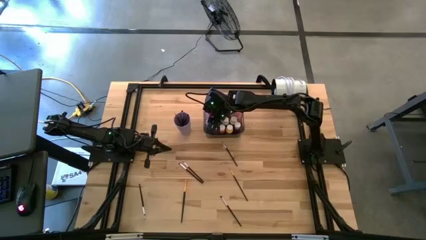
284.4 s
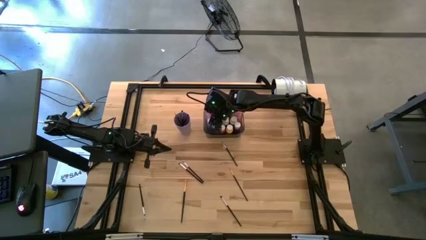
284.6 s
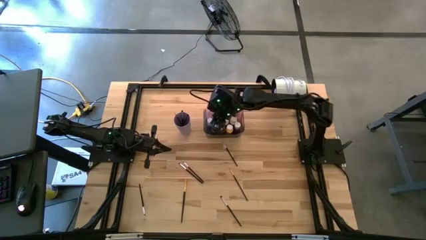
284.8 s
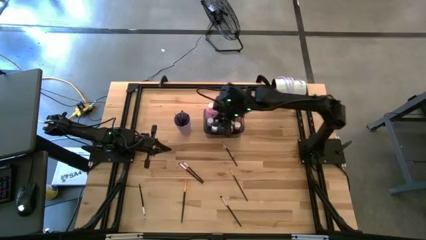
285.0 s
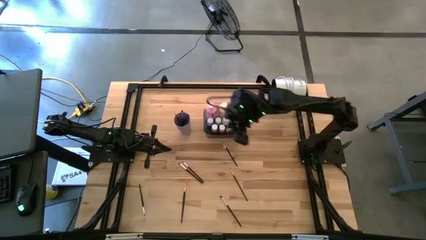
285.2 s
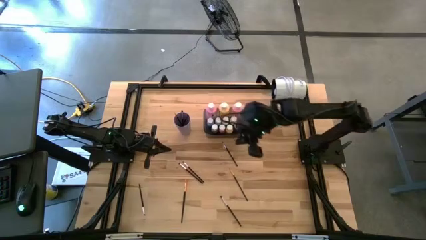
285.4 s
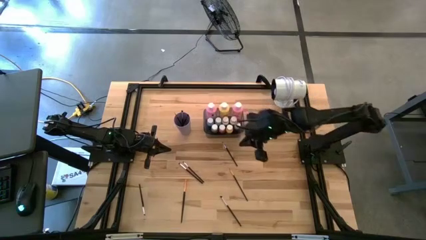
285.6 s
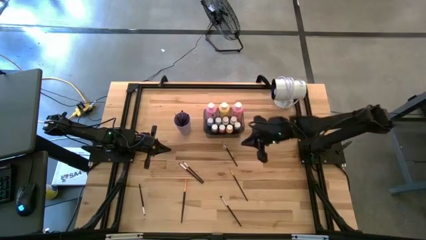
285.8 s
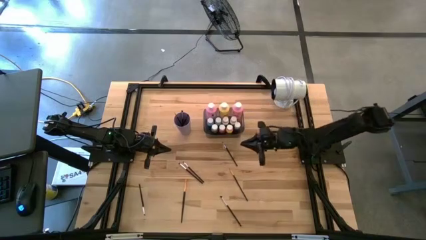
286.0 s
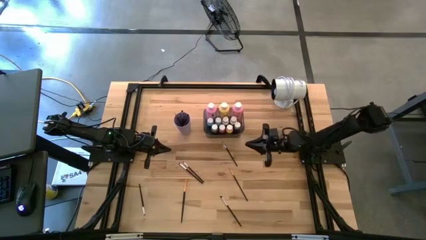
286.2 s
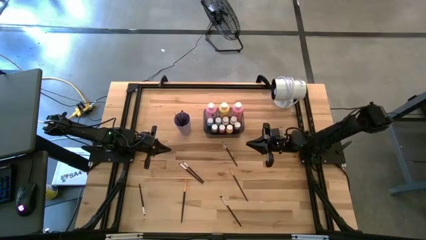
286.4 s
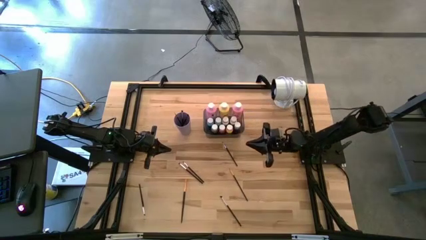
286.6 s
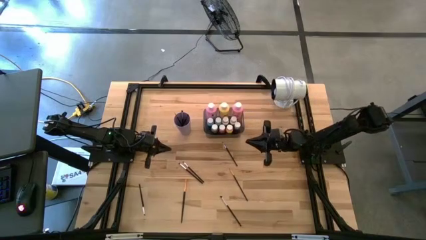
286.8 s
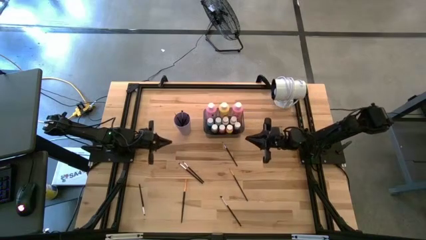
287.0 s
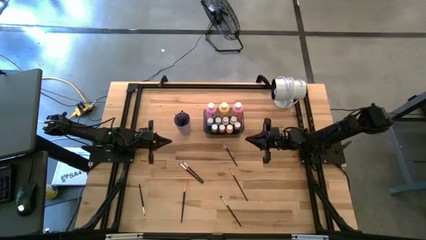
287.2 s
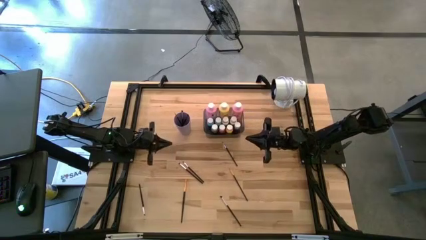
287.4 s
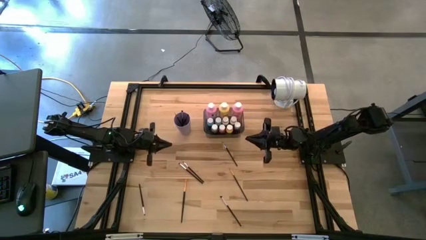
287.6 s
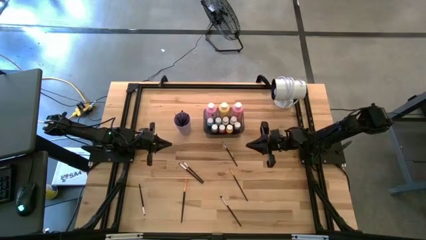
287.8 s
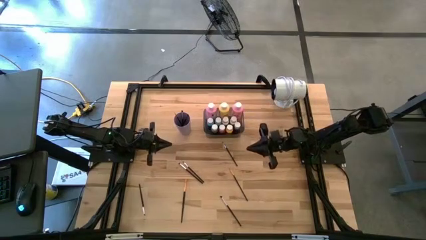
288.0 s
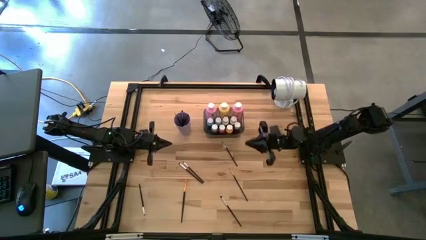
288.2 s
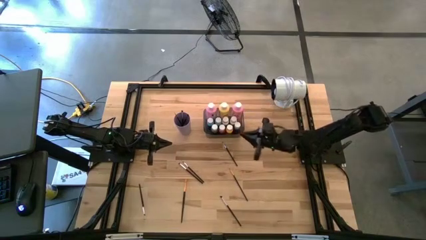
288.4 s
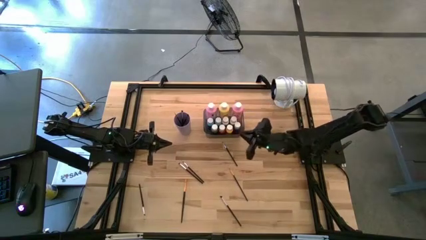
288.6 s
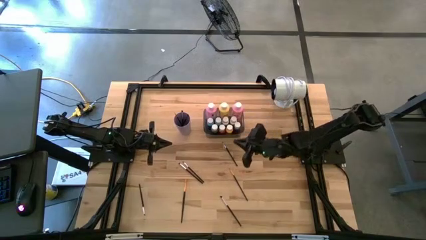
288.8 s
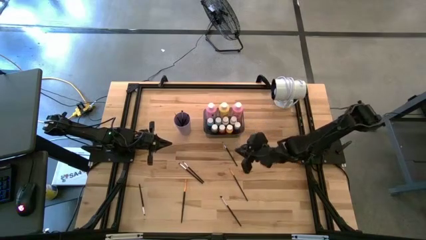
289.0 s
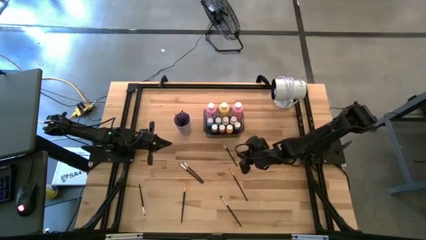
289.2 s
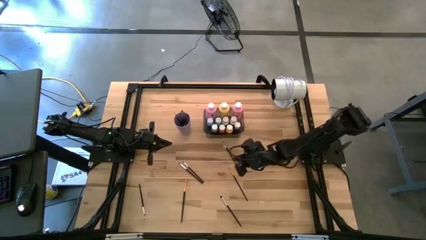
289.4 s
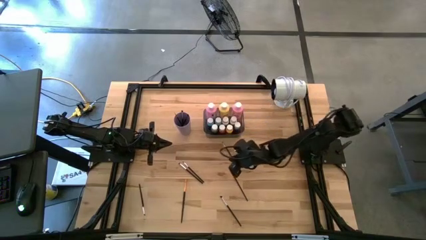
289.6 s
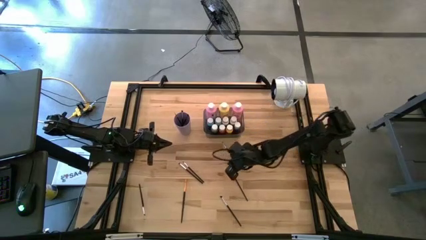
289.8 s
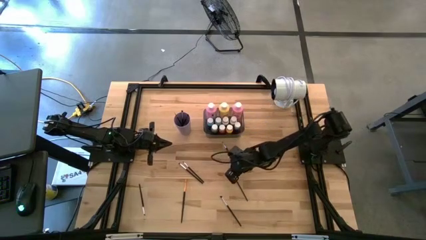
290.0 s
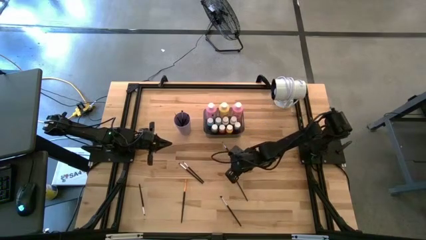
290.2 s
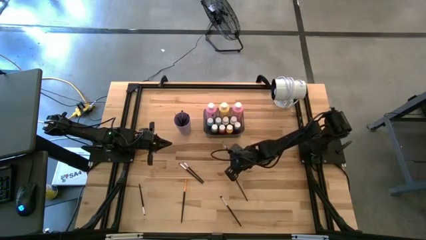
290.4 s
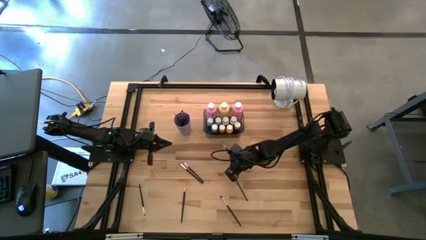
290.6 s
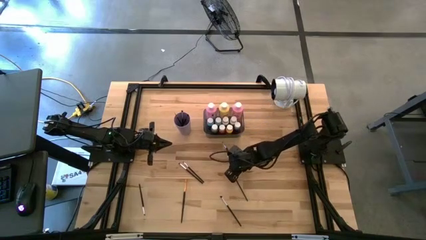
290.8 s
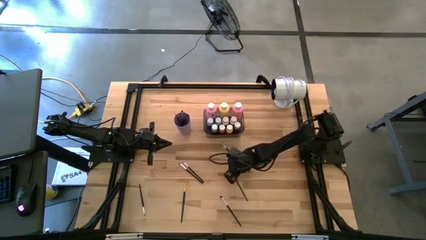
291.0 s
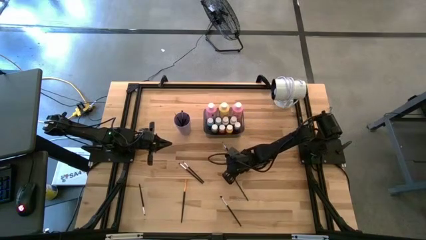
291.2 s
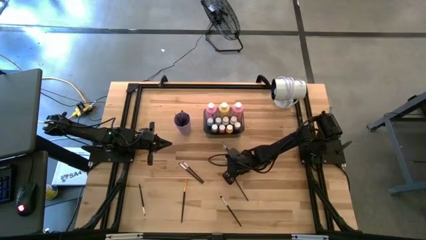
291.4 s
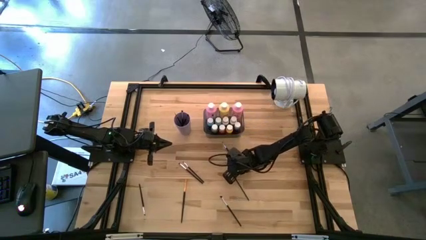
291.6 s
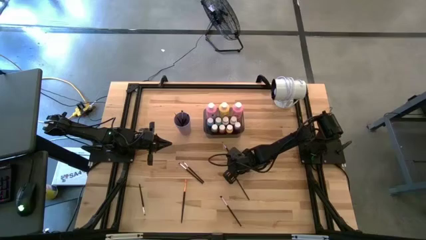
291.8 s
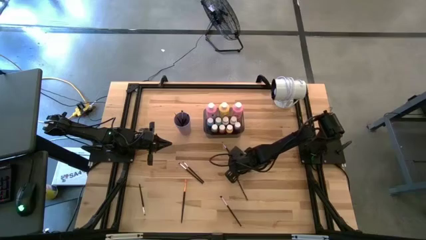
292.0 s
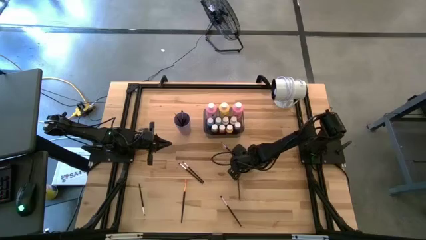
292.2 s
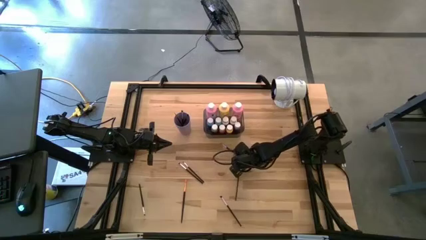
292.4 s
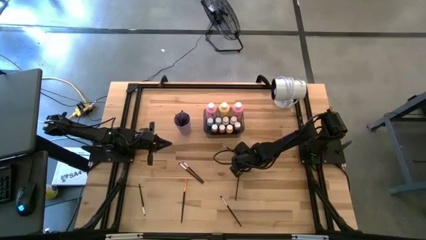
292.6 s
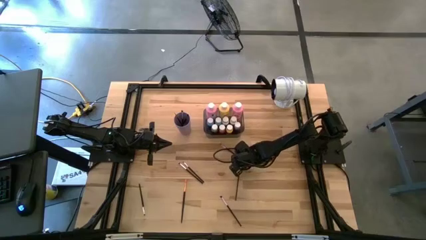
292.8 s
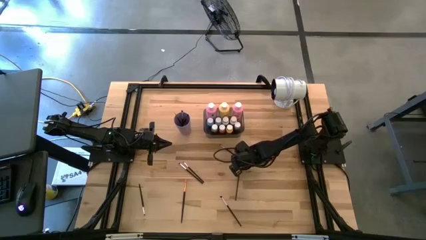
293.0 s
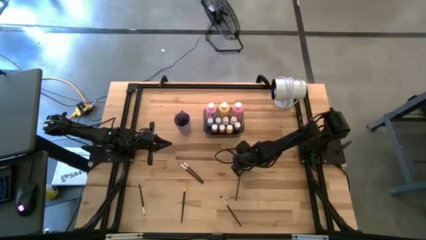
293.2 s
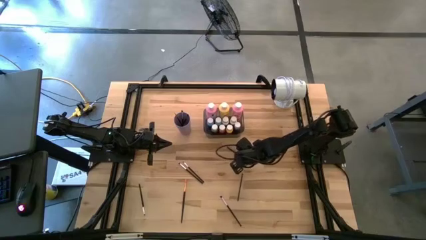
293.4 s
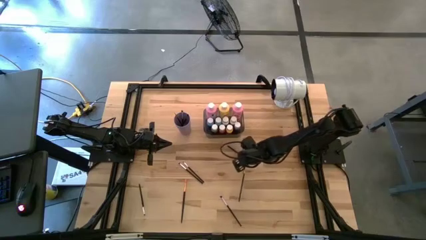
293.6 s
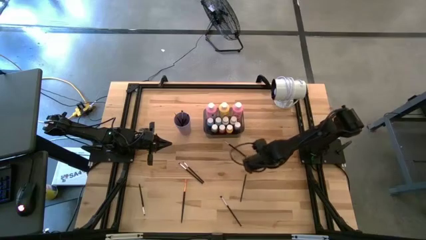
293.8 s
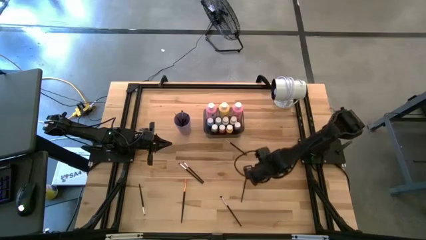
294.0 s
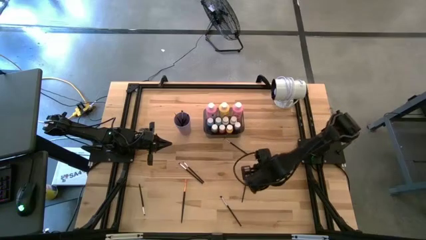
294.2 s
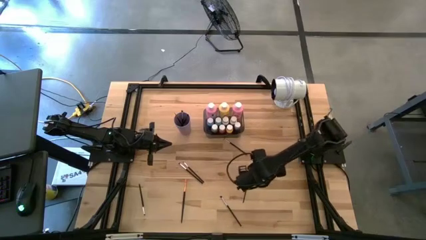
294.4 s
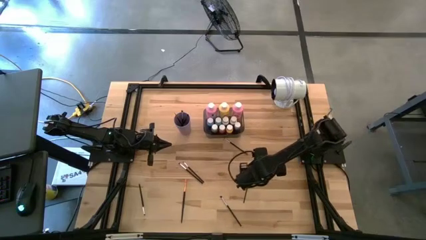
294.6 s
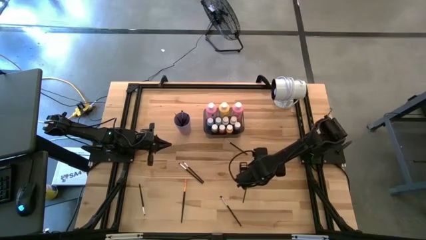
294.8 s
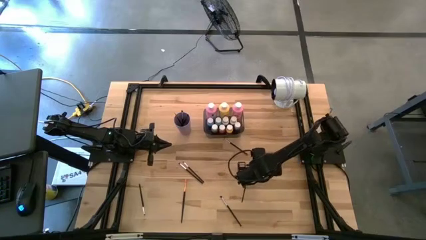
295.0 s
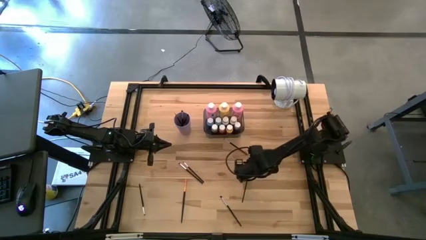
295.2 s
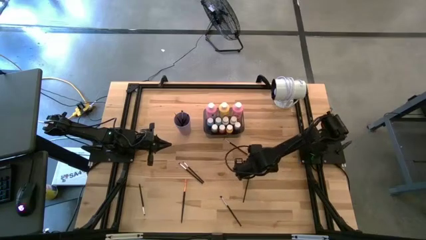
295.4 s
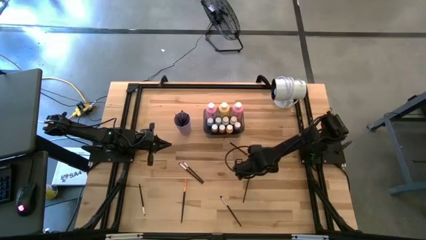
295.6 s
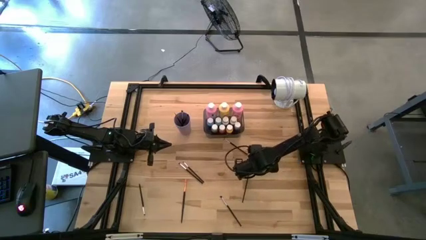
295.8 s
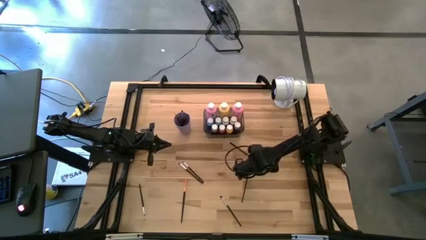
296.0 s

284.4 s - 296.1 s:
Task: Pick & Place Paint Supplies
Put the gold paint brush into the purple cup

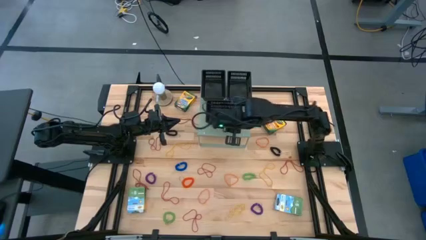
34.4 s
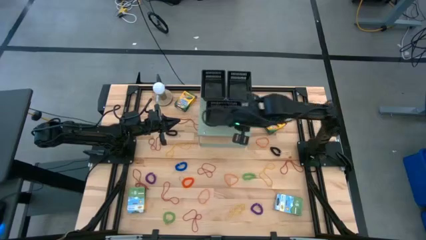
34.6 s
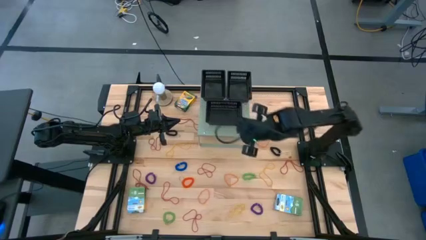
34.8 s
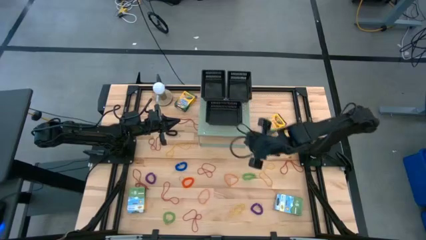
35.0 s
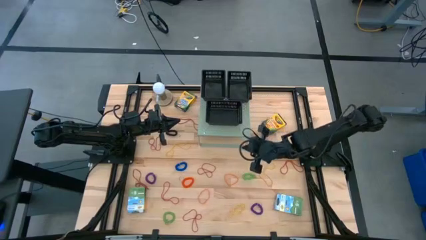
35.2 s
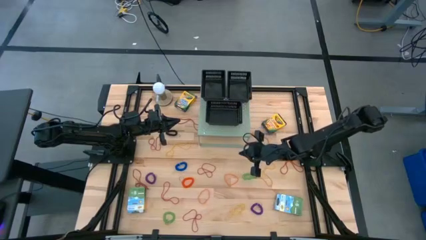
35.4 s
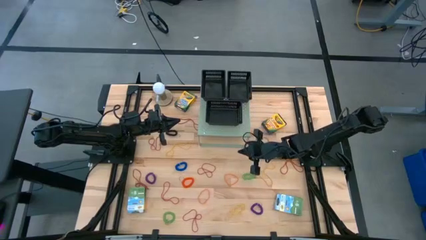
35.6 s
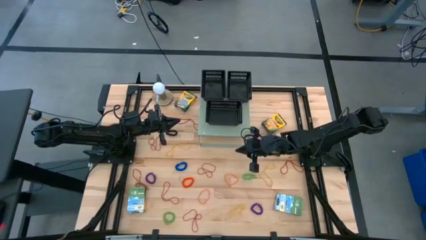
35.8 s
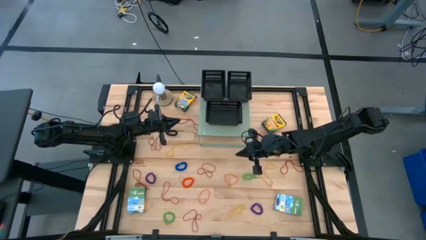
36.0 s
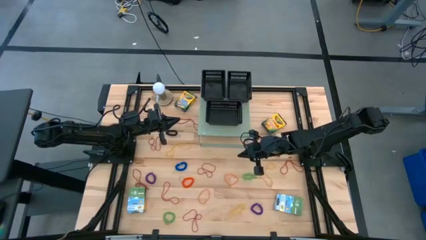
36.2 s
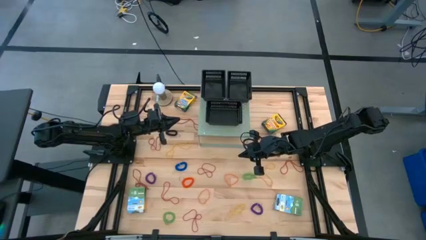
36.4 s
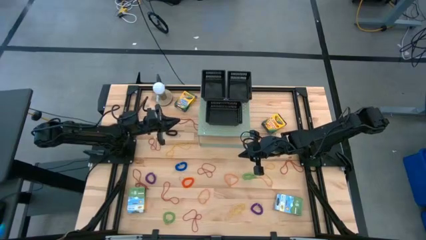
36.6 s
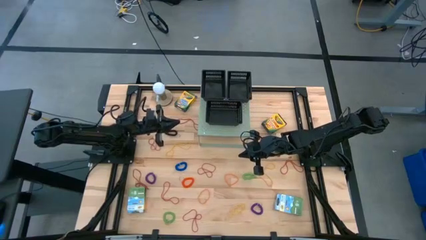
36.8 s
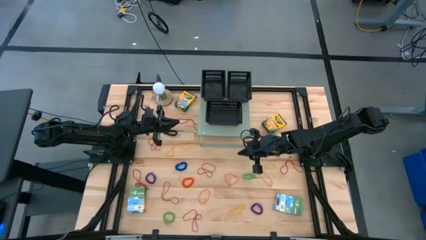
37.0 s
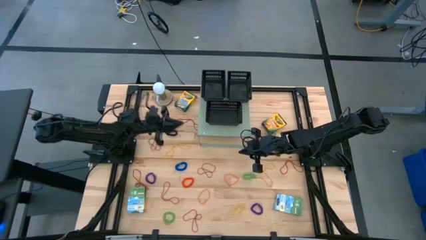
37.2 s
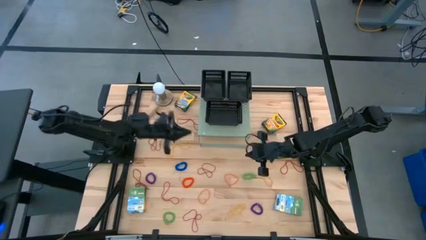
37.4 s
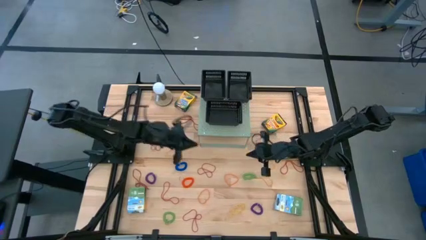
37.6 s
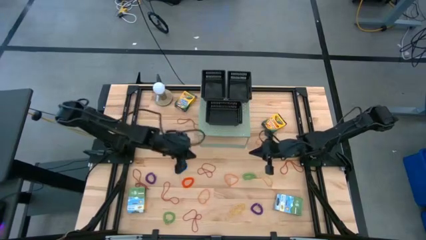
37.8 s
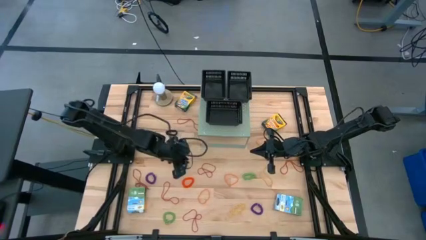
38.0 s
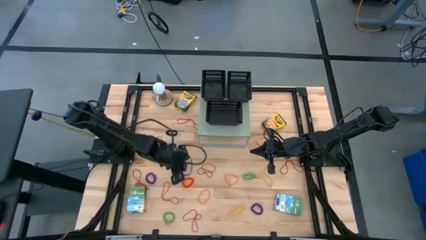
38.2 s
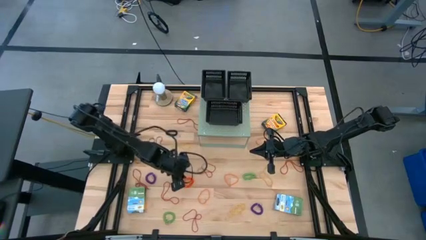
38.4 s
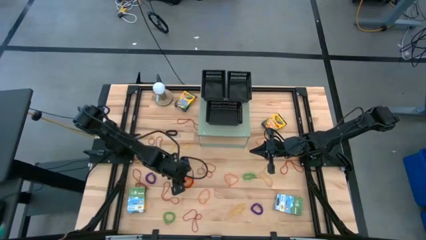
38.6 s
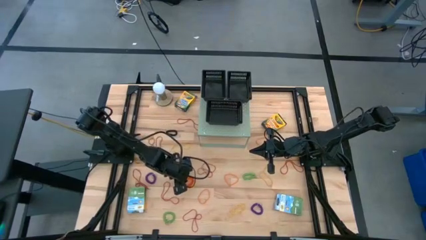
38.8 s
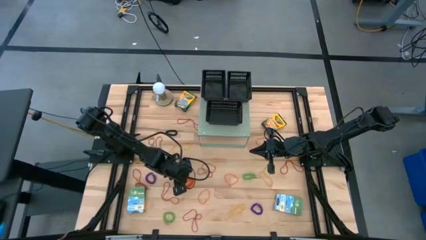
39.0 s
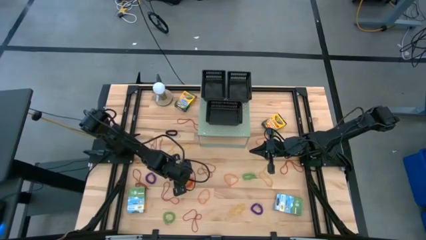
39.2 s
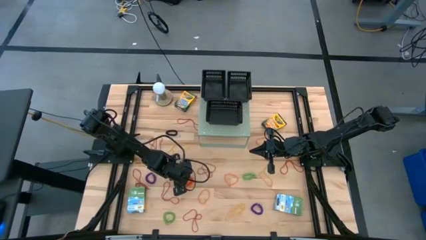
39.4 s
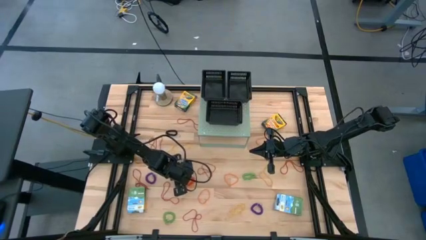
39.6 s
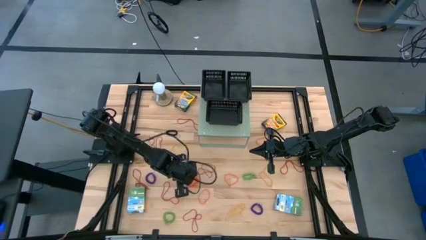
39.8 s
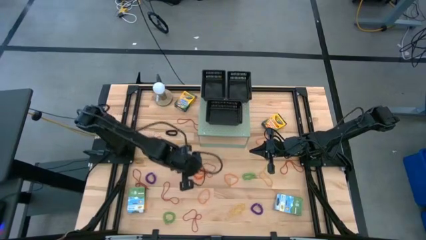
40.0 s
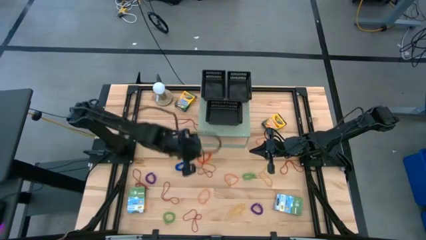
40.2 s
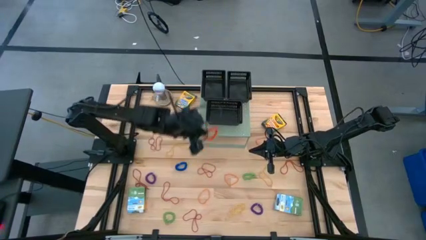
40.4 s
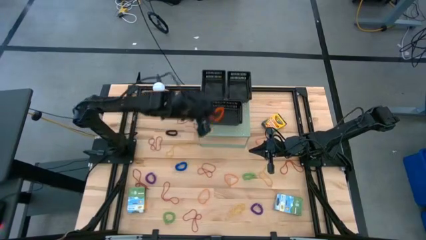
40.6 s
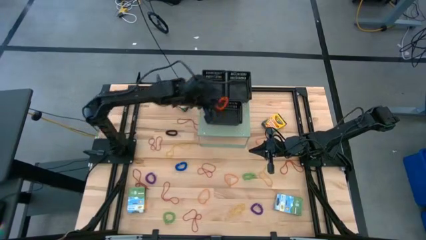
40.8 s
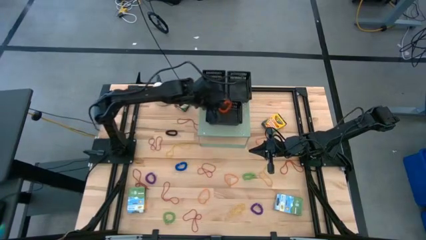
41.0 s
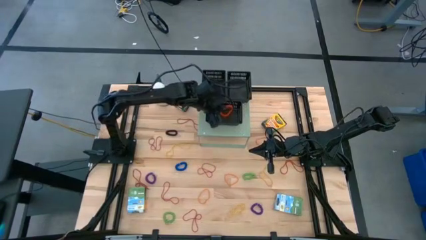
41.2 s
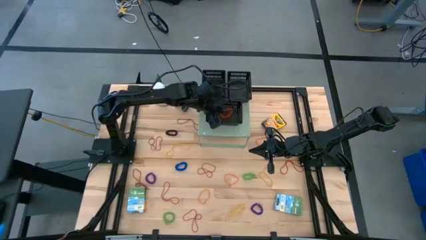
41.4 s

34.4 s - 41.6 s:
Task: Pick & Place Office Desk Supplies
Put the orange spring keychain into the bottom black bin on the shelf
